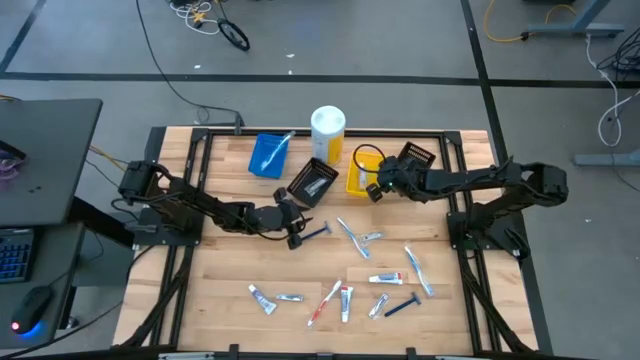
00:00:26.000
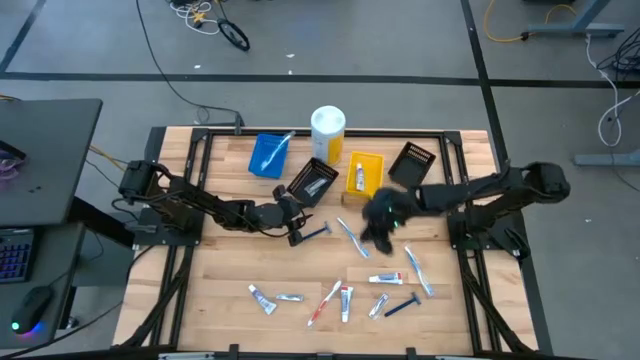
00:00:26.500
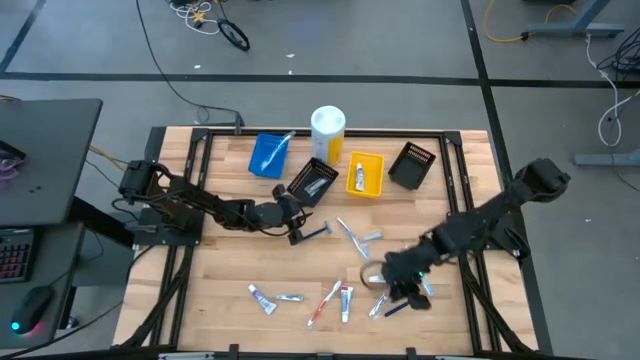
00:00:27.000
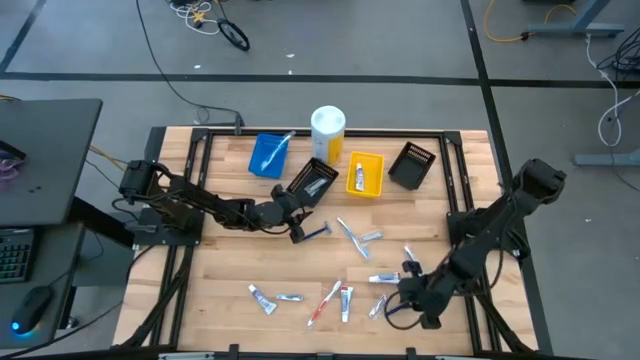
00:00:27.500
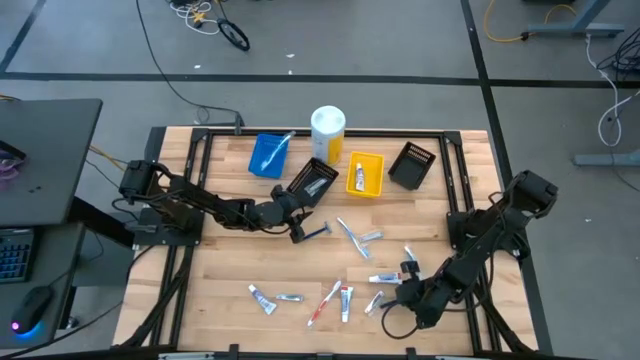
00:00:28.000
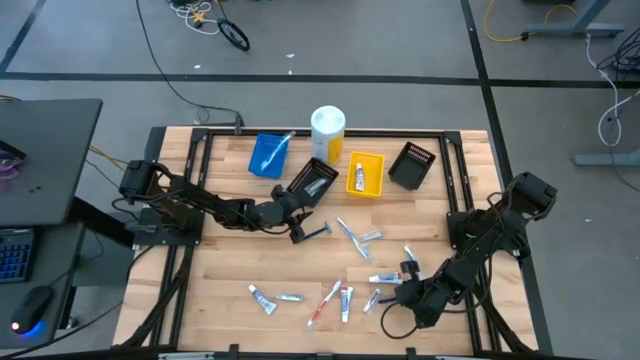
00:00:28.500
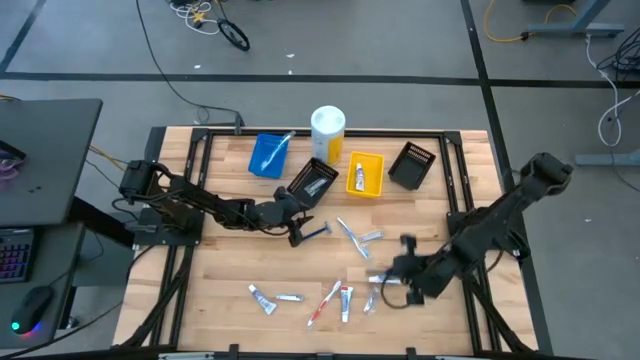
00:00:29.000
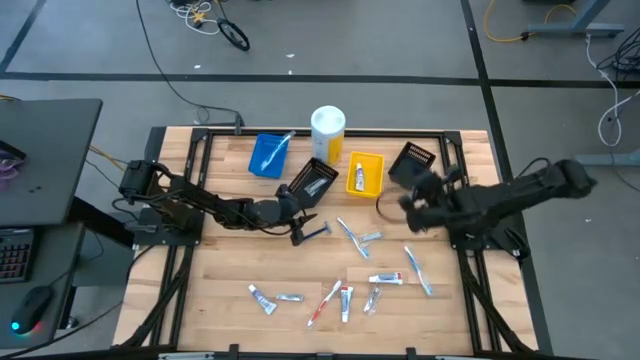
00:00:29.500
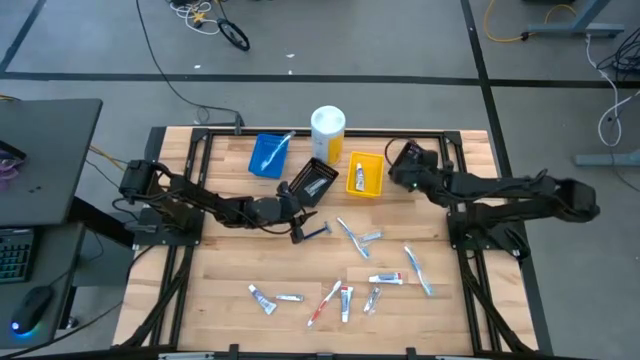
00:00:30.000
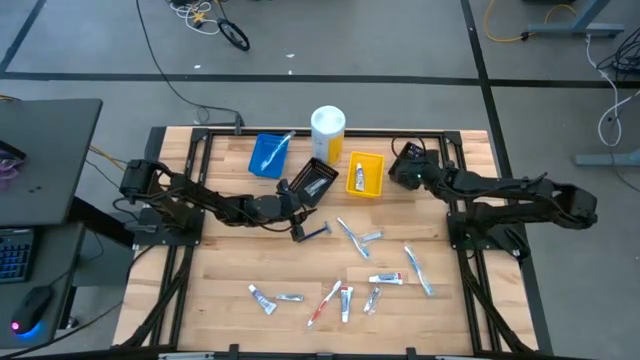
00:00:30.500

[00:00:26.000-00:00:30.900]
Task: Pick & Place Travel size toiletries
Put the razor into the right black bin

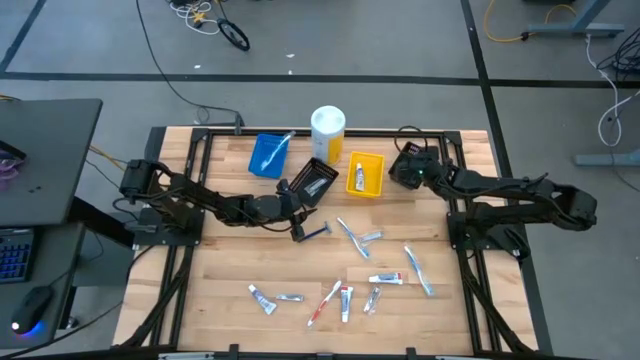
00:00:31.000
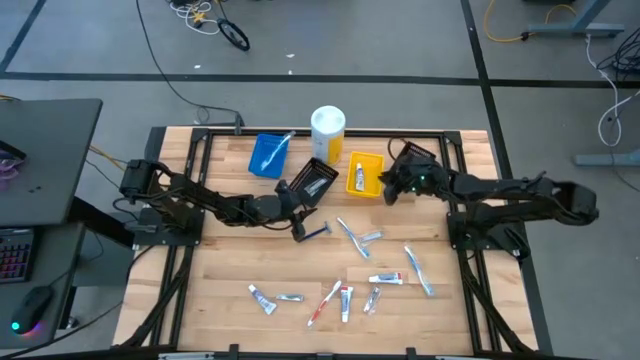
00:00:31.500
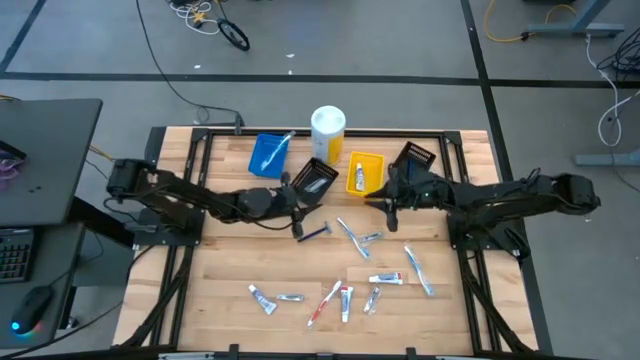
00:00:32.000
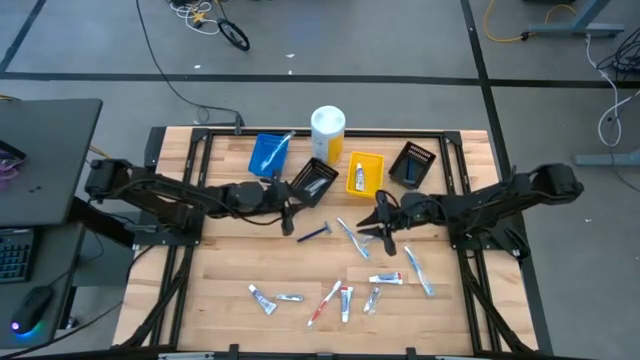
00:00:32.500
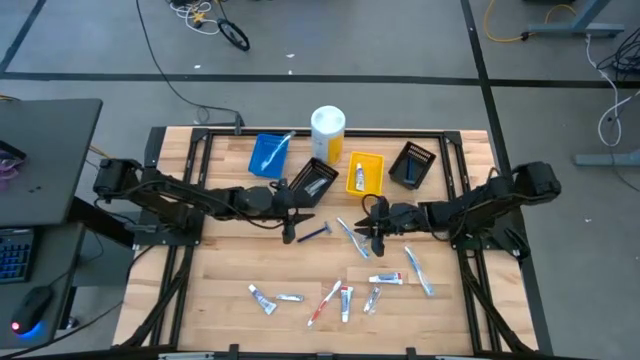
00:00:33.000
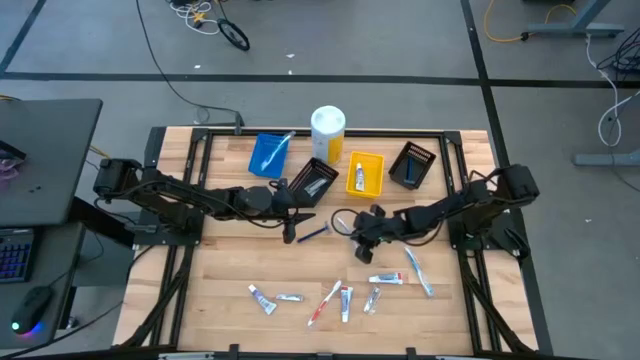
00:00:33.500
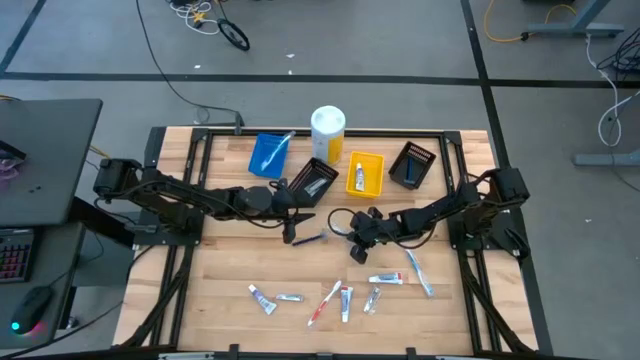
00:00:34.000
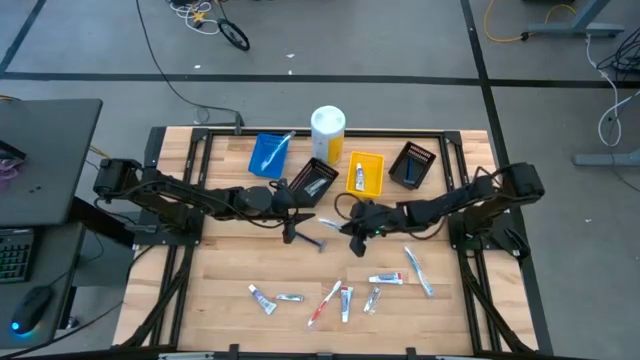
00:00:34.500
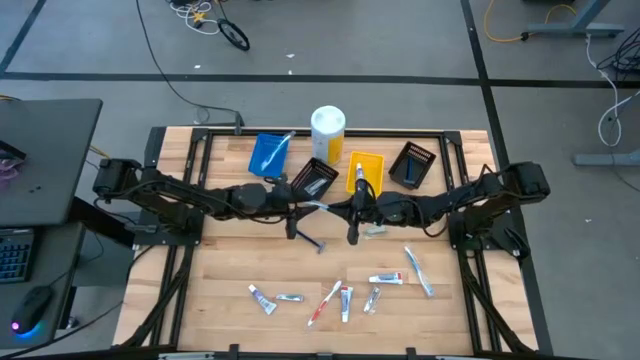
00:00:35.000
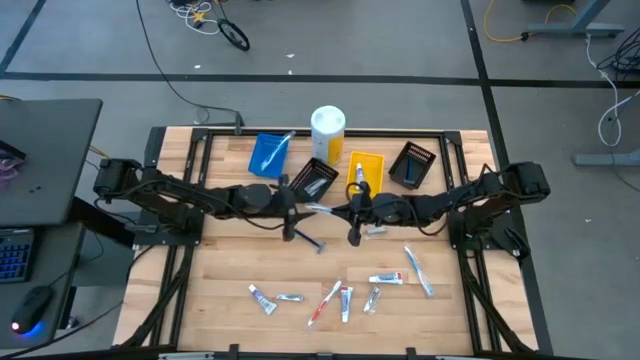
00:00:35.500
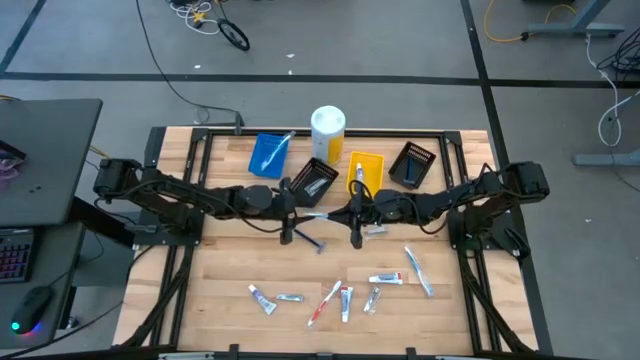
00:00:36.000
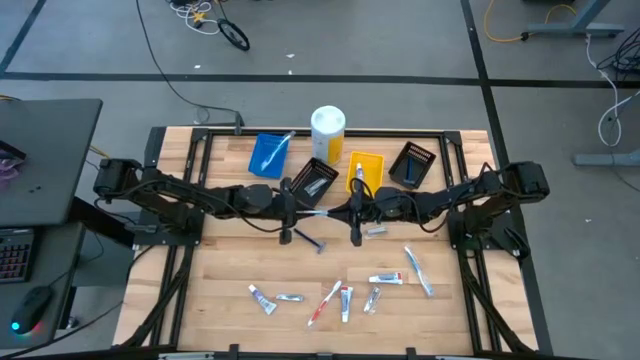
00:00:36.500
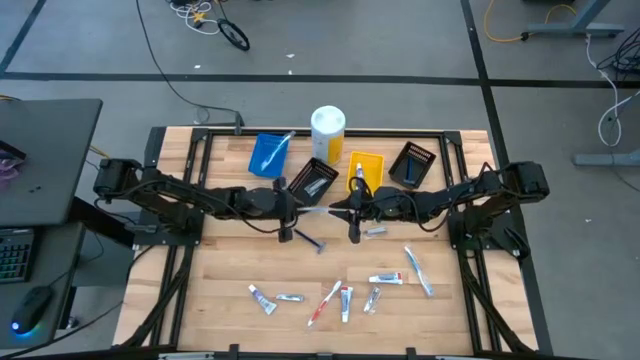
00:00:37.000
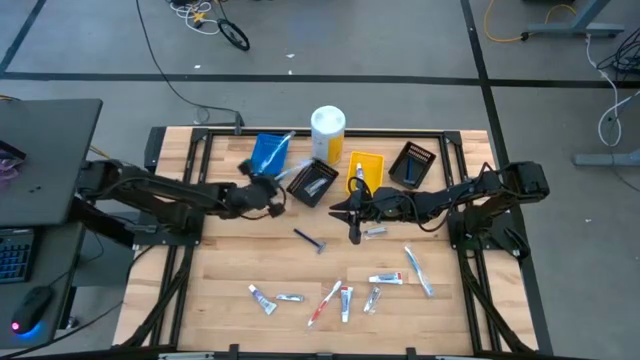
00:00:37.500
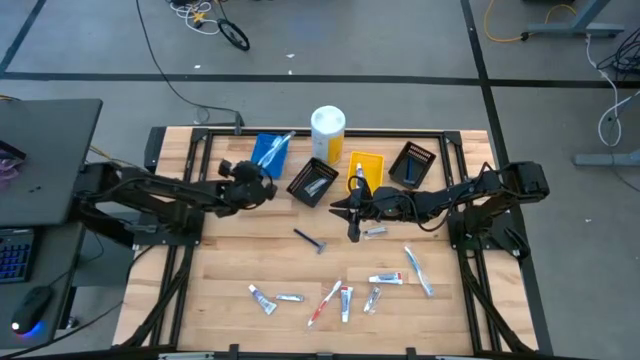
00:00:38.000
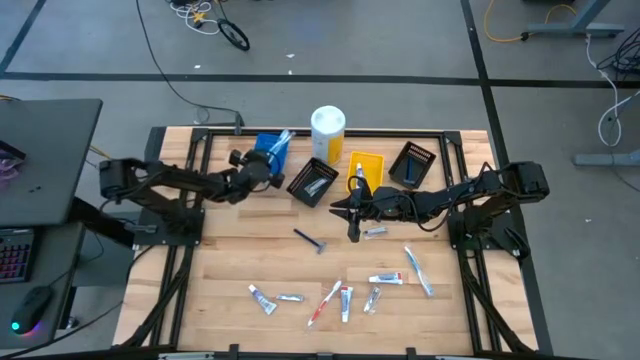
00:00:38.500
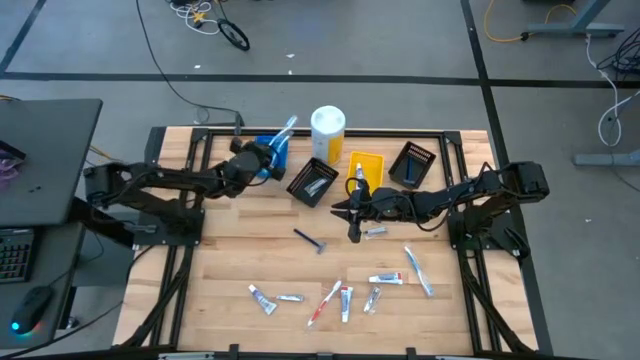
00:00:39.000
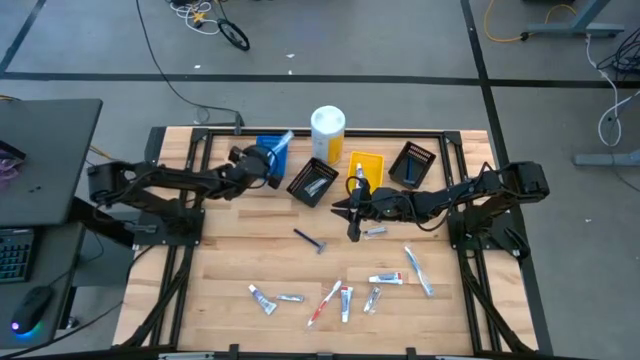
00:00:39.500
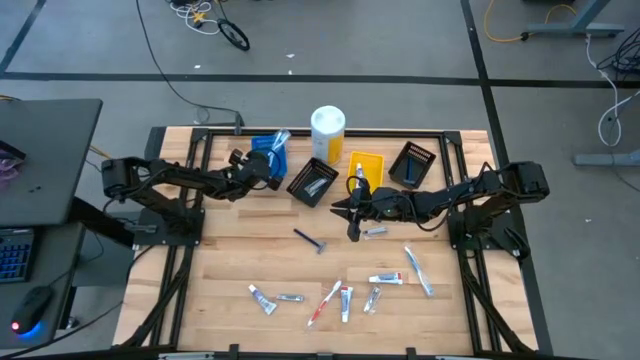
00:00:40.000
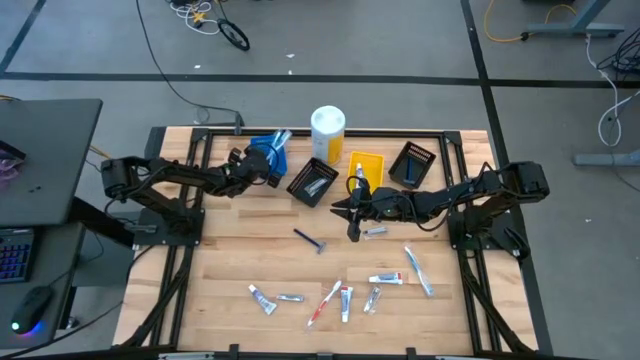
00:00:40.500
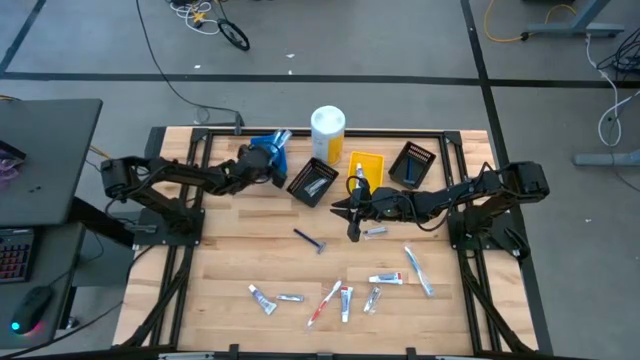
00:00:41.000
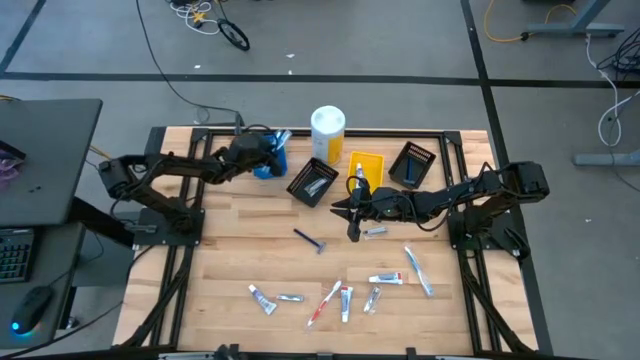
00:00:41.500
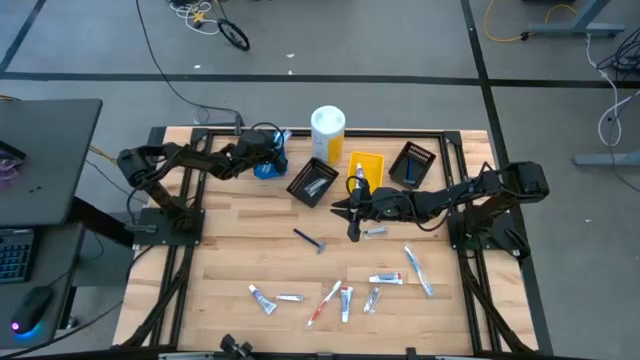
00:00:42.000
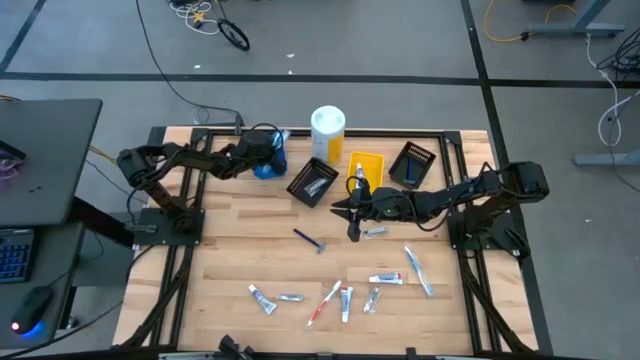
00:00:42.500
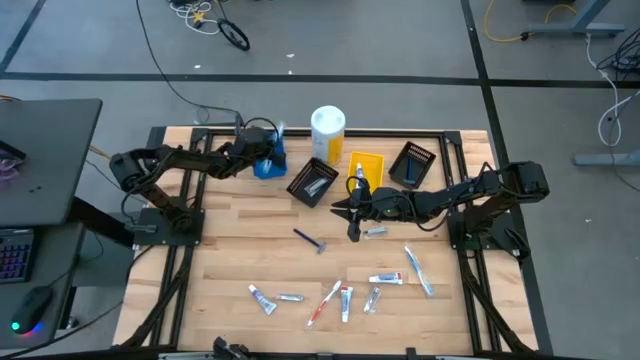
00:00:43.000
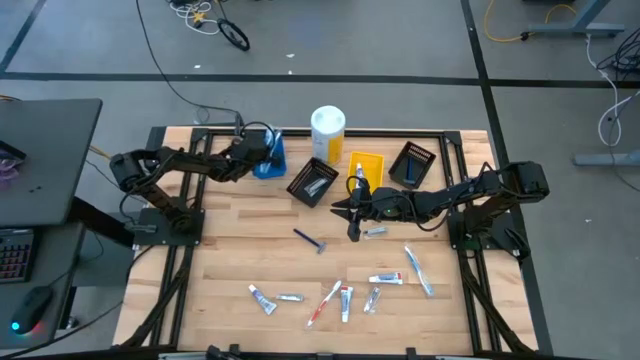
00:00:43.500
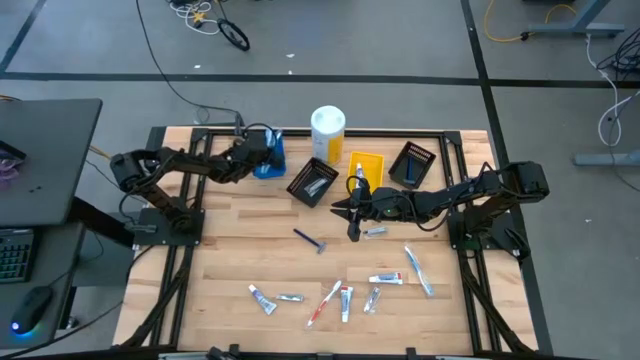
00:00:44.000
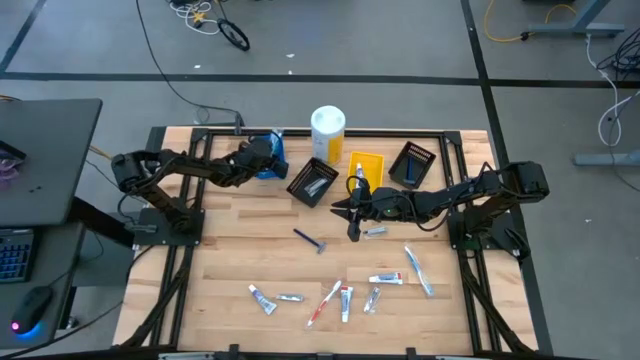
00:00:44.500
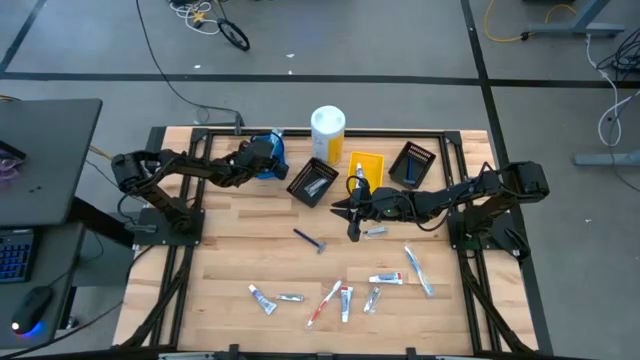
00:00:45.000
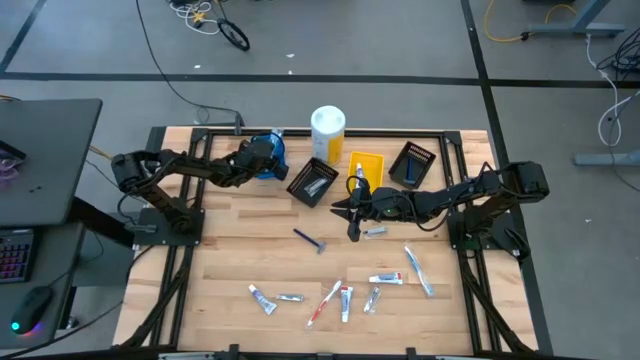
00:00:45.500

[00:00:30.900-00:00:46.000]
Put the blue toothbrush into the blue bin

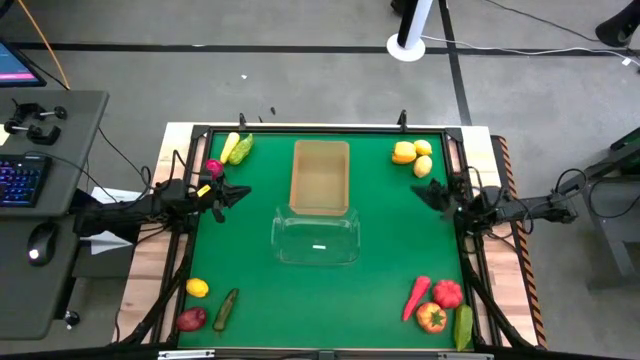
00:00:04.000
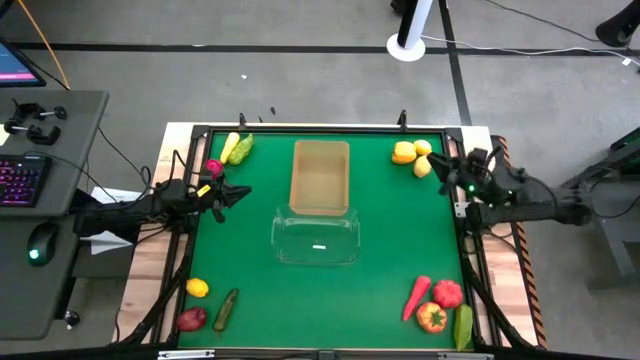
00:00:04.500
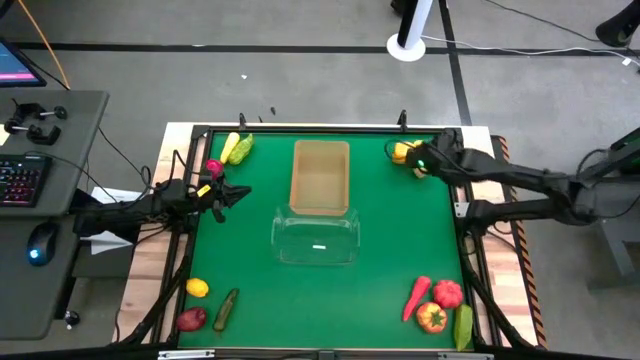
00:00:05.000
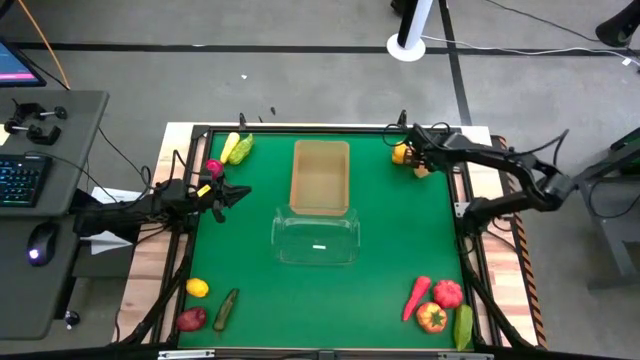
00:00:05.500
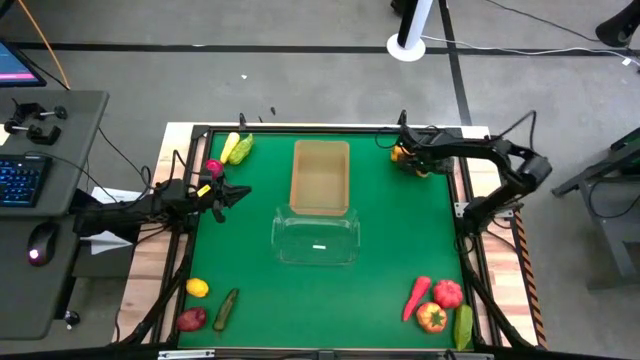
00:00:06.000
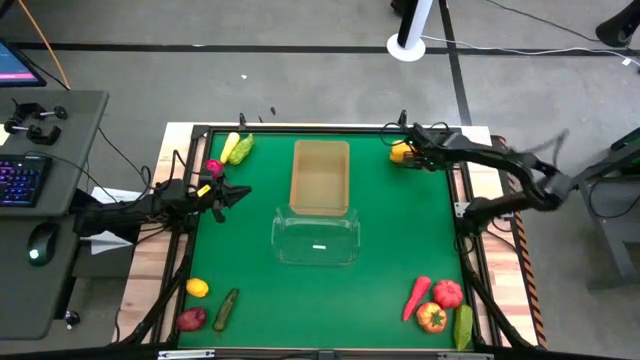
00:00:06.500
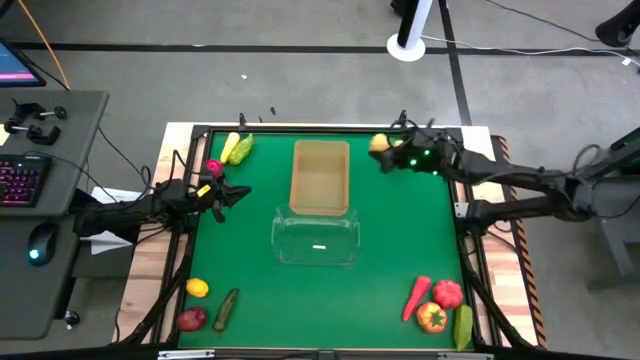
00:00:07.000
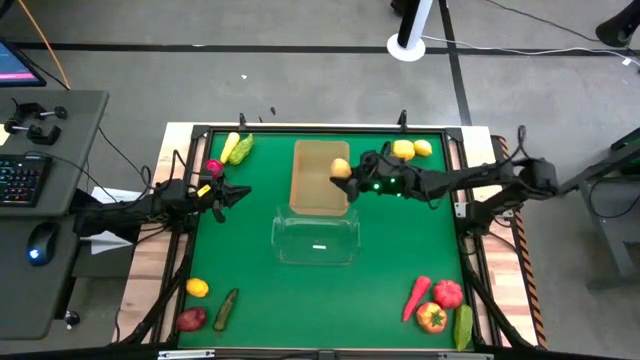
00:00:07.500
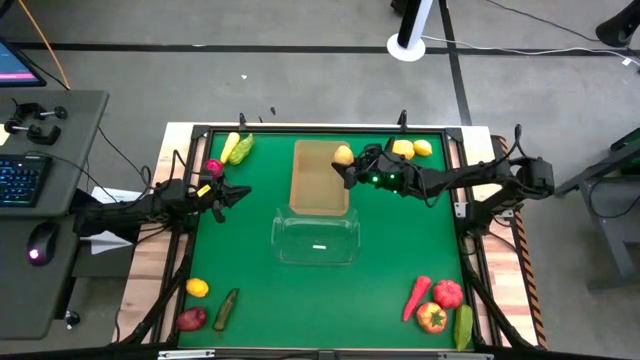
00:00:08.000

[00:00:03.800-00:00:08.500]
Task: Sort produce into baskets
Put the middle yellow lemon into the orange bin
